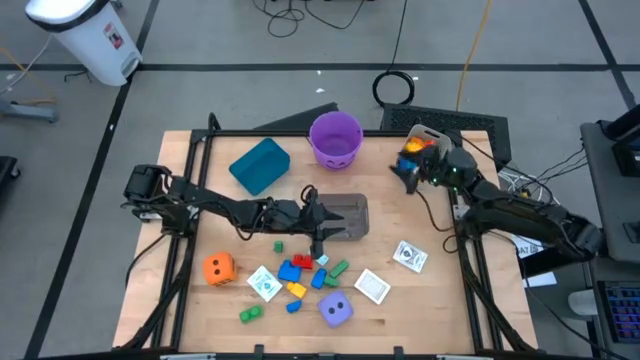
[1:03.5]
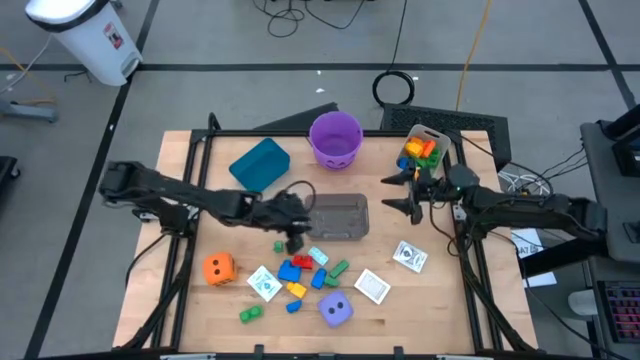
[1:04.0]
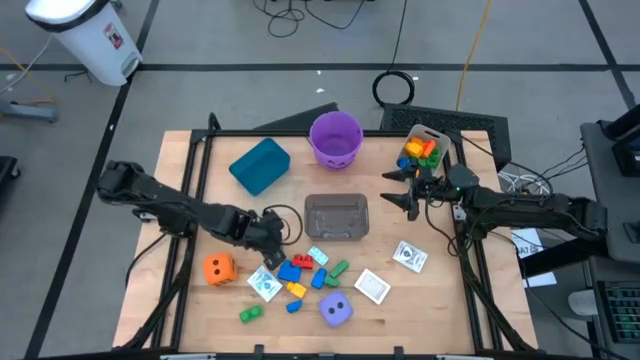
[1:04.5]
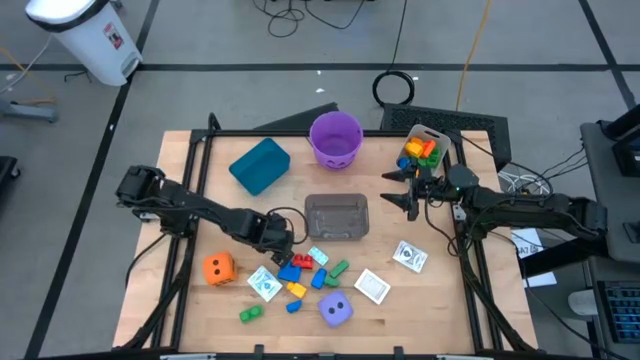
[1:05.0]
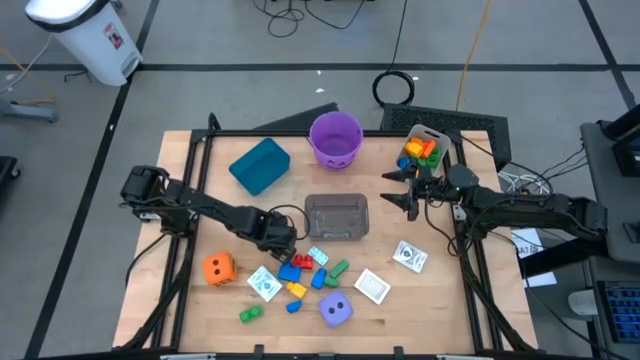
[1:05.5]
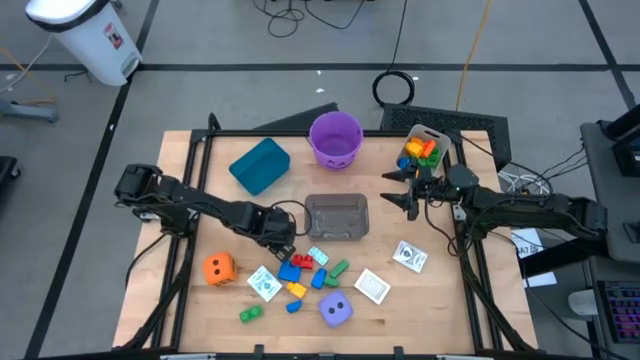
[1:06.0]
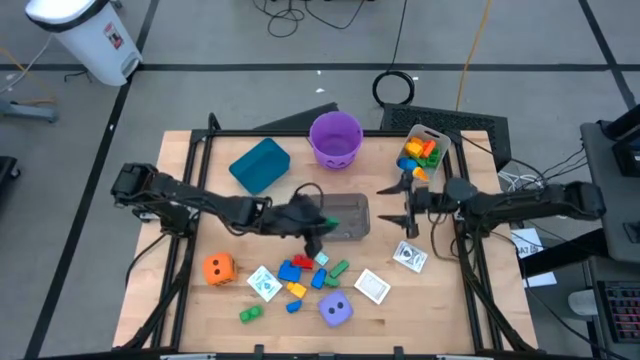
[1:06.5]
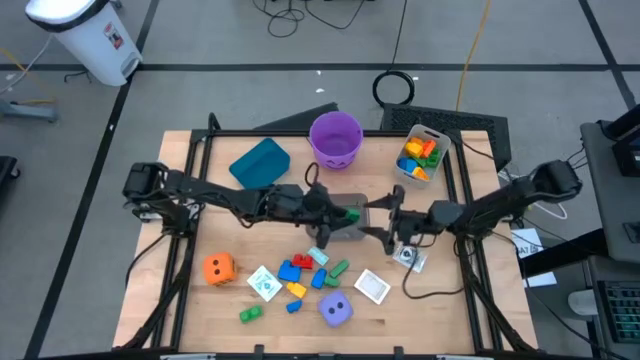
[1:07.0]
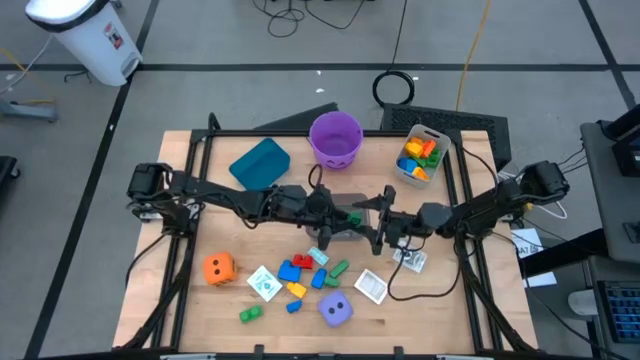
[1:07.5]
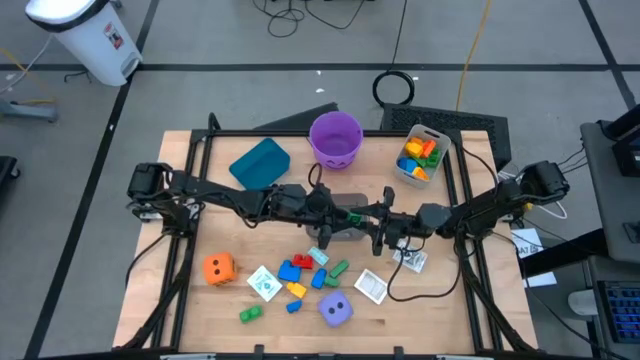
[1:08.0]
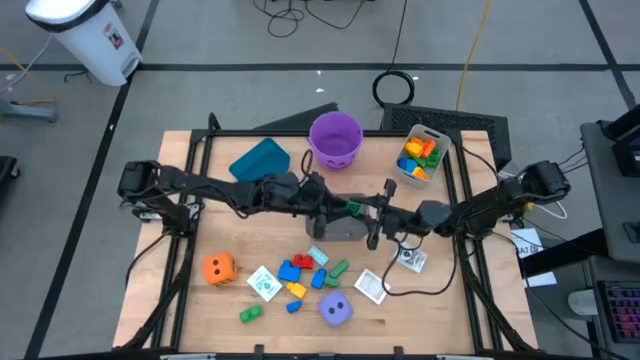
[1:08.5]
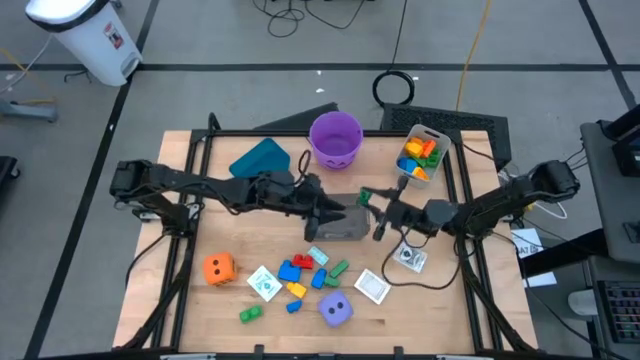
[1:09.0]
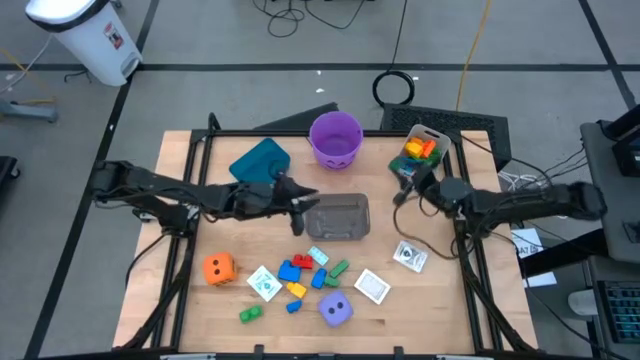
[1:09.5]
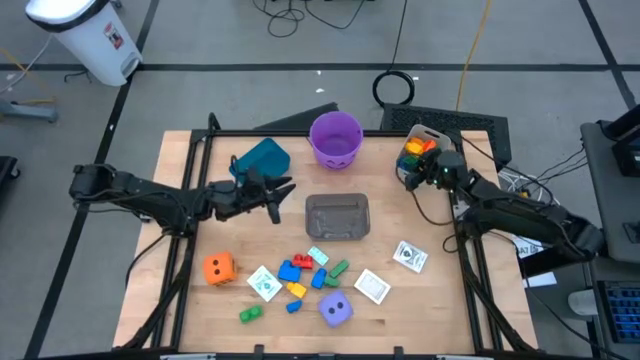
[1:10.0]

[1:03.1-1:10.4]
Task: Pick & Place Toys
Put the green game piece into the white bin

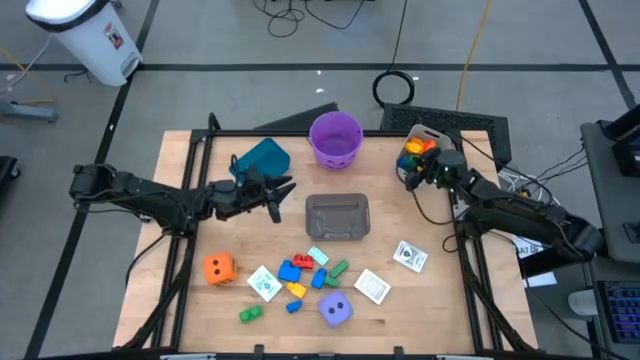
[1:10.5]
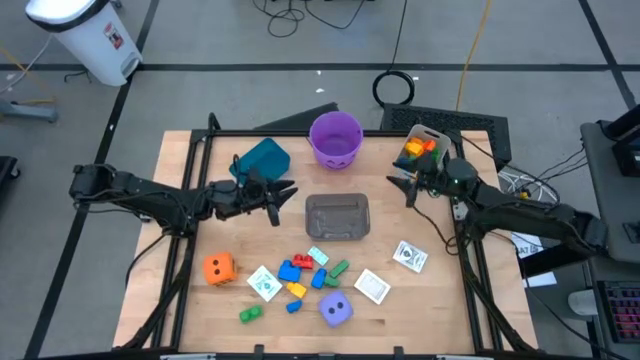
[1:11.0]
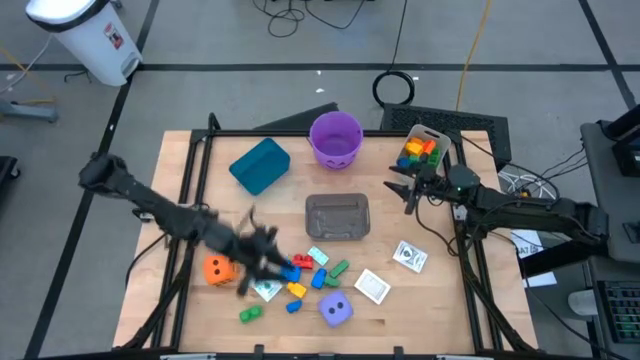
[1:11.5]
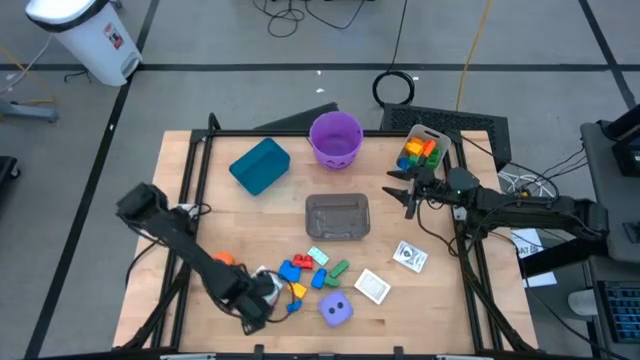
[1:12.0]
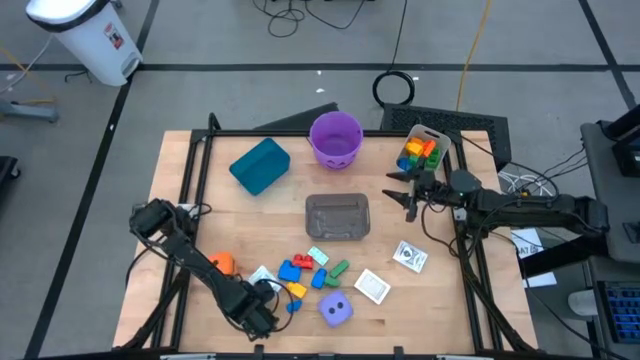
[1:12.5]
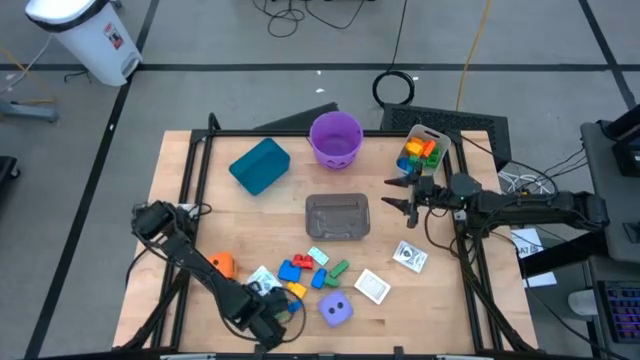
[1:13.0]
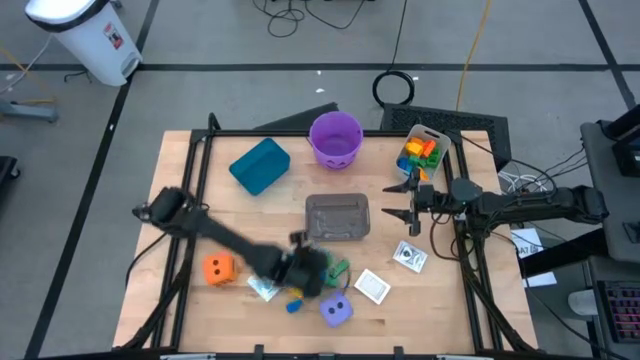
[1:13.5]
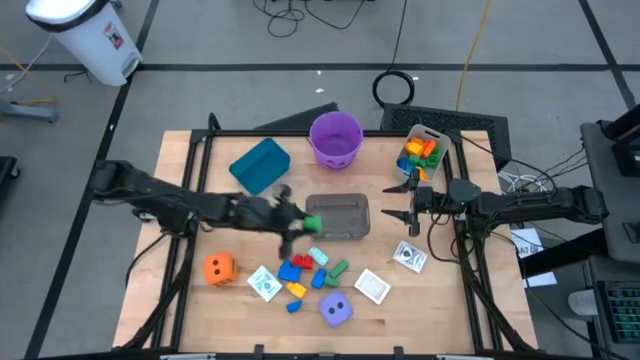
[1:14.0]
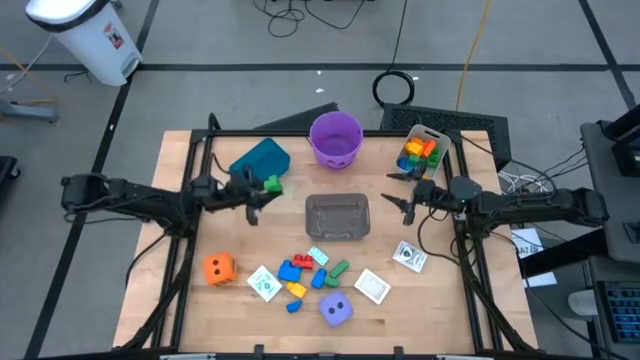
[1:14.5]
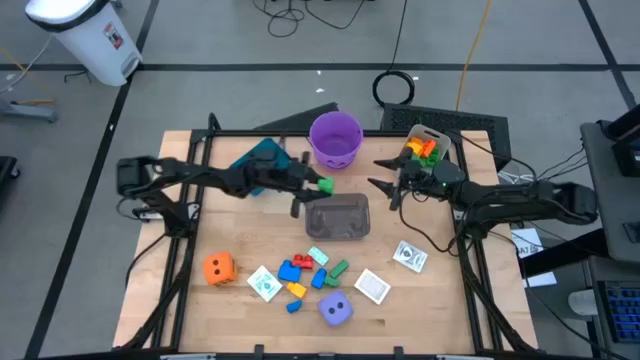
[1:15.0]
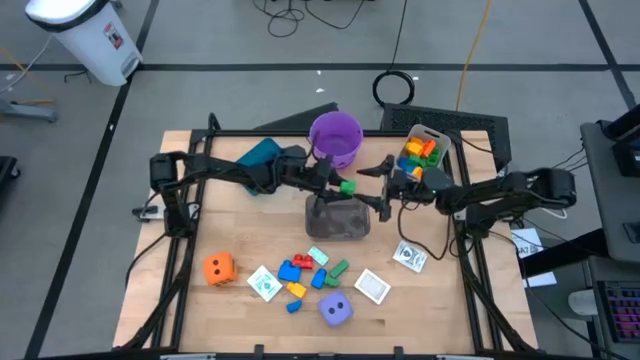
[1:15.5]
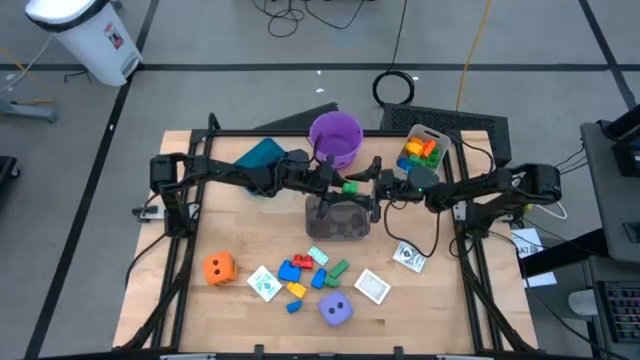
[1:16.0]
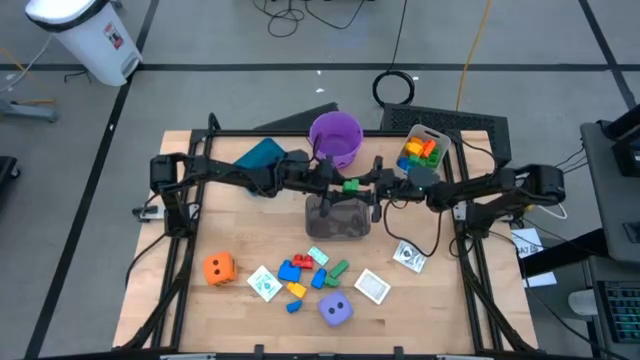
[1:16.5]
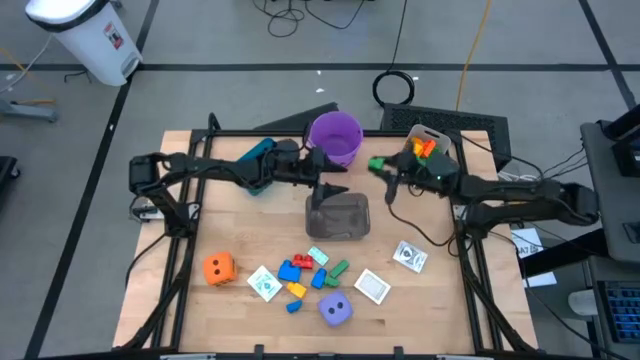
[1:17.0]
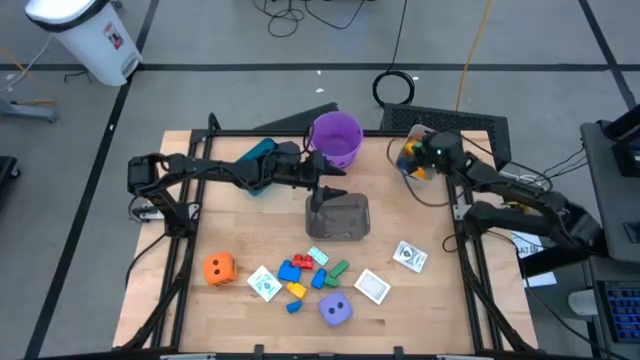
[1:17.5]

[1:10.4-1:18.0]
Put the green game piece into the white bin

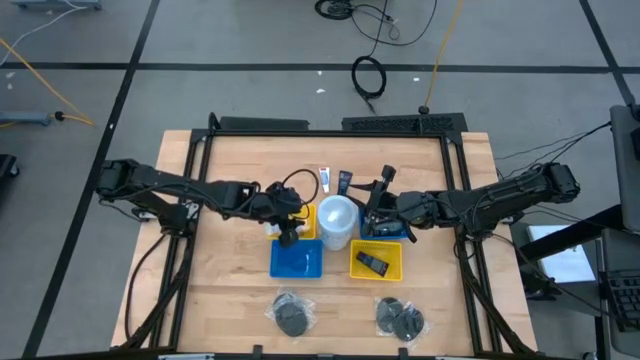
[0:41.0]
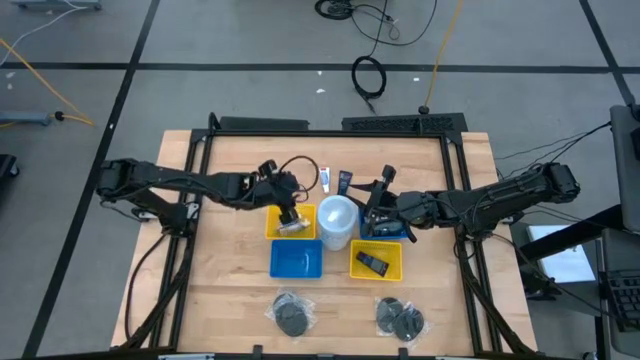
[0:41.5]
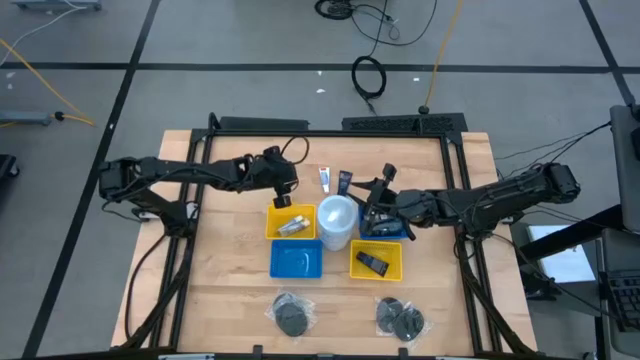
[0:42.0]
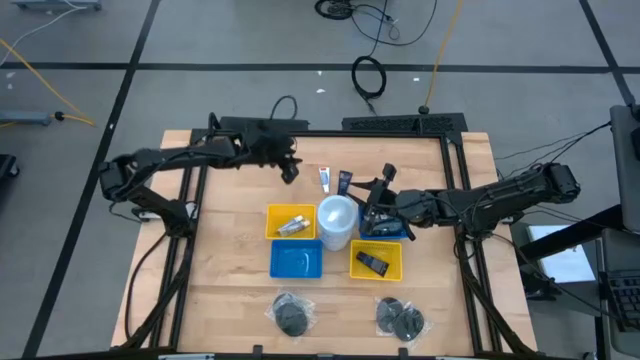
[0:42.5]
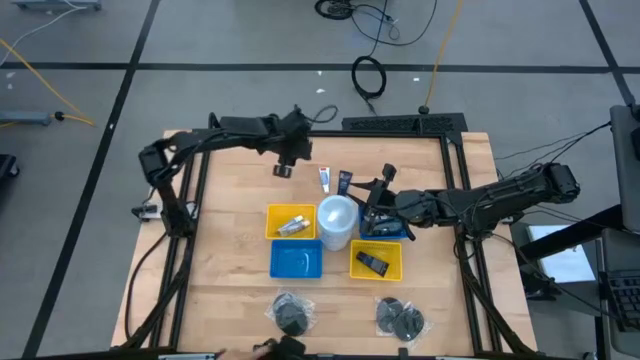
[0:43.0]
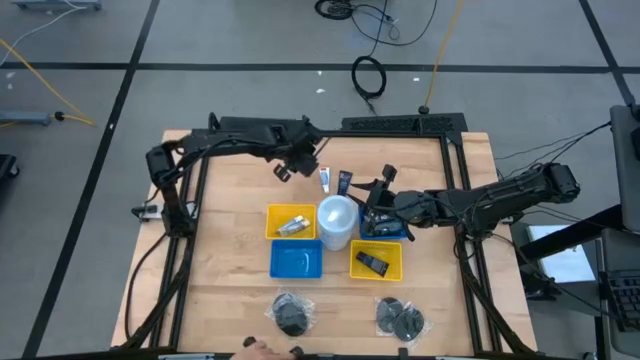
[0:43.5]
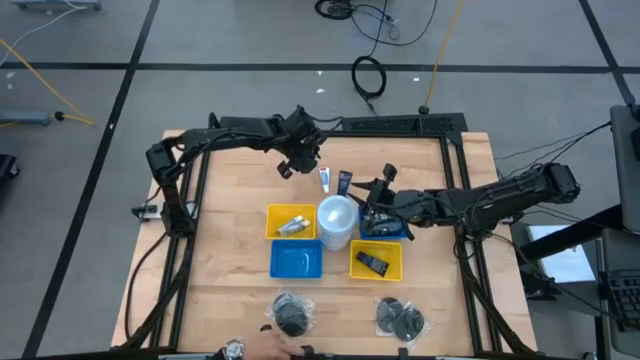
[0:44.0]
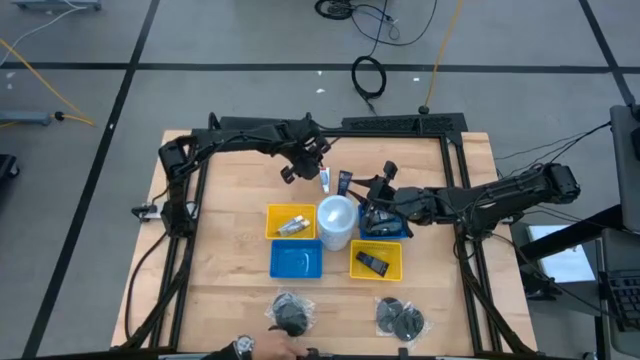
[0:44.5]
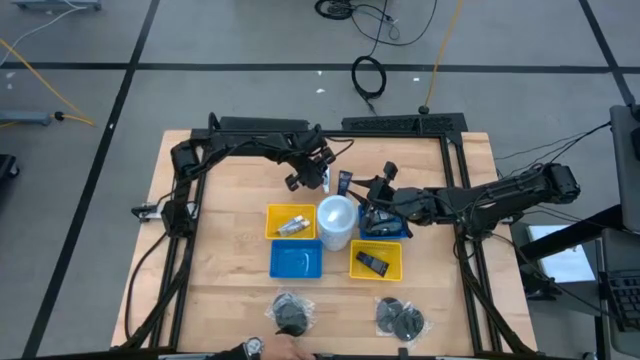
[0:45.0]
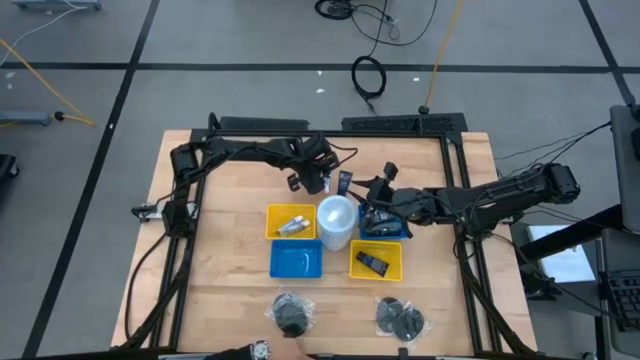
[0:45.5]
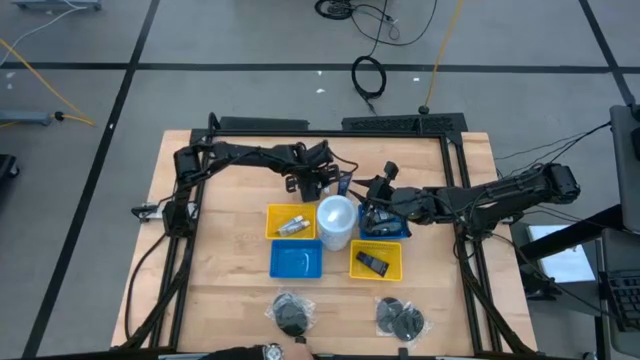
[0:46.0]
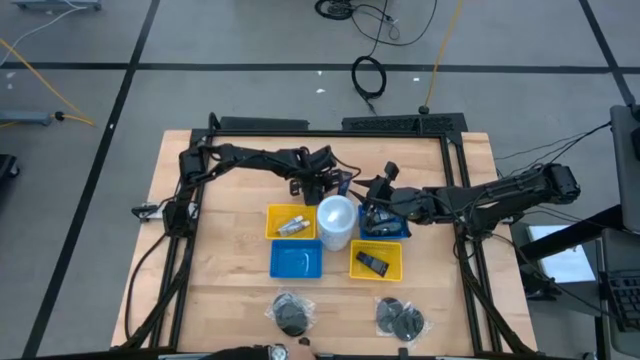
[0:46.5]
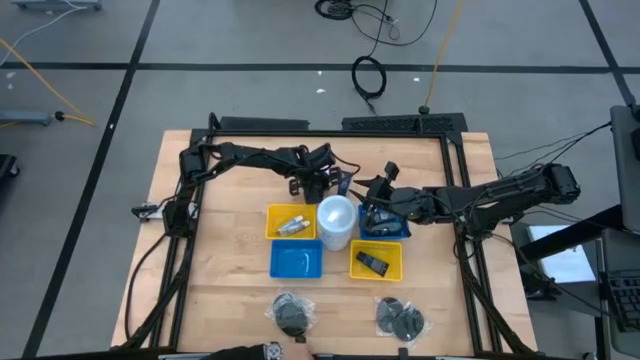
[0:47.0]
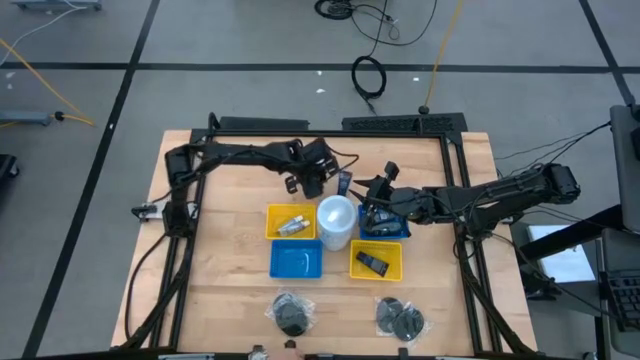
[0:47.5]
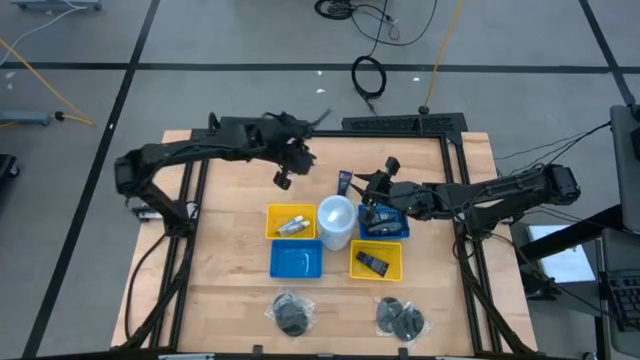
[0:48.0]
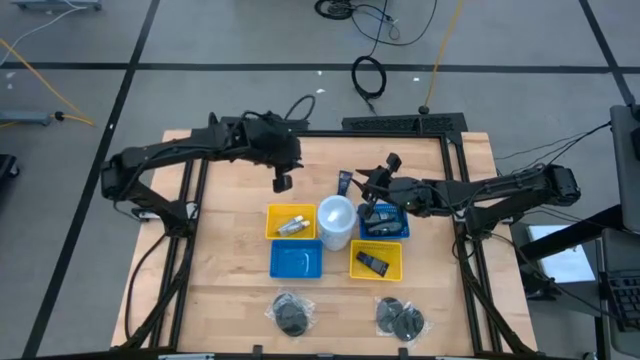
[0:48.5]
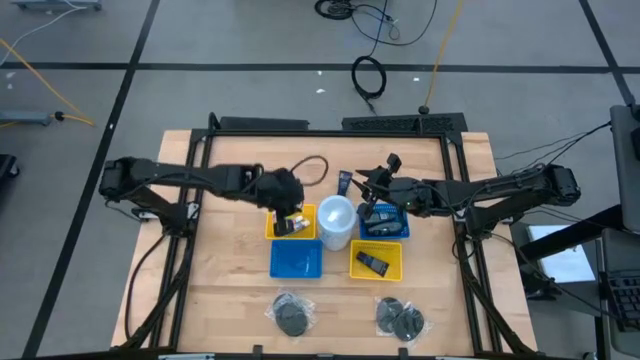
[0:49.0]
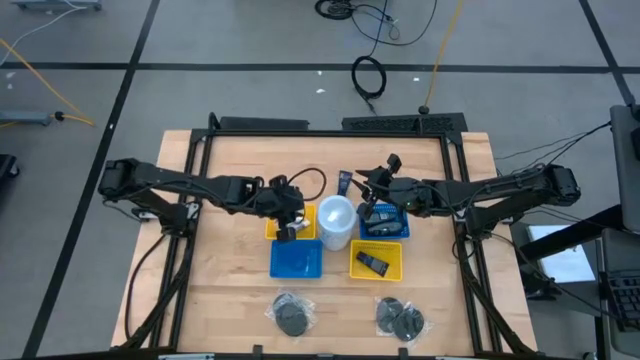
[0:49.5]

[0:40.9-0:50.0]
Task: Pick & Place Travel size toiletries
Put the white toothpaste into the top yellow bin
